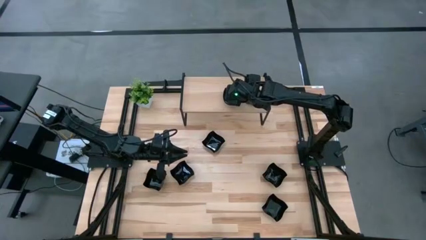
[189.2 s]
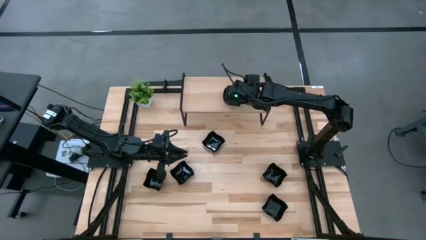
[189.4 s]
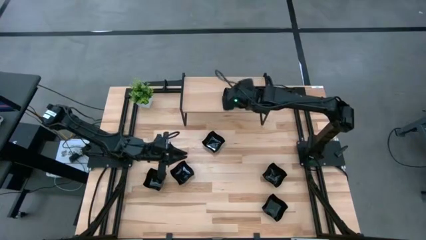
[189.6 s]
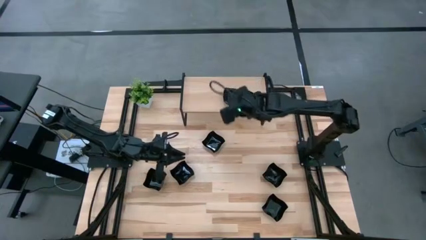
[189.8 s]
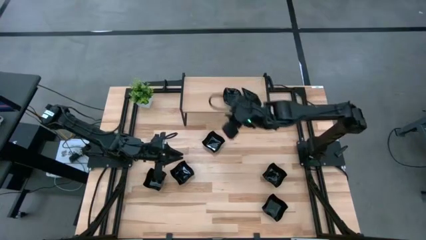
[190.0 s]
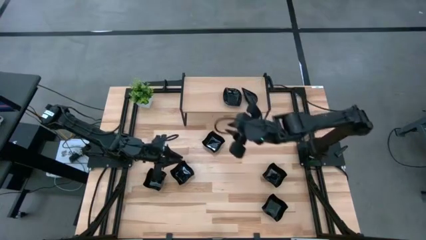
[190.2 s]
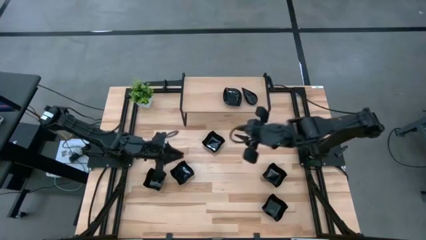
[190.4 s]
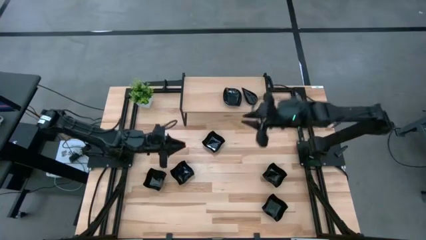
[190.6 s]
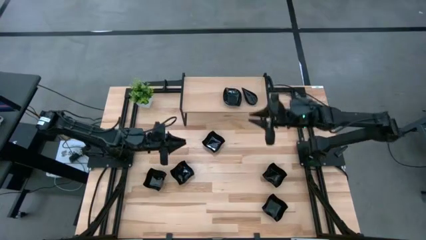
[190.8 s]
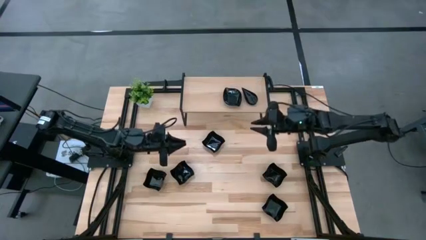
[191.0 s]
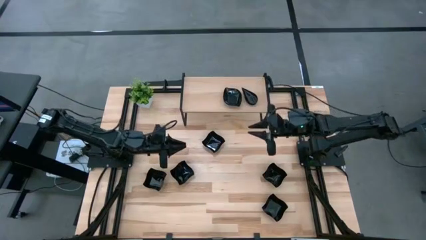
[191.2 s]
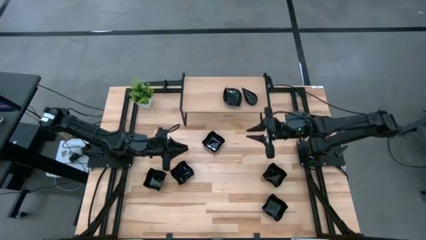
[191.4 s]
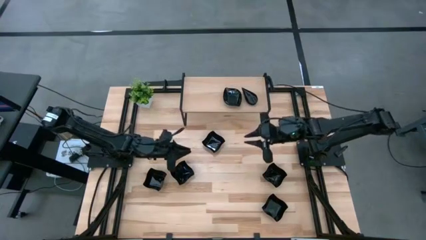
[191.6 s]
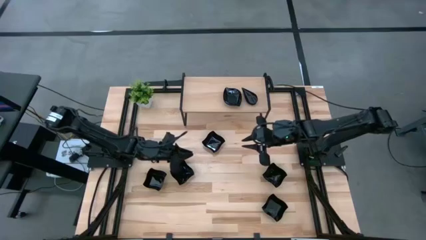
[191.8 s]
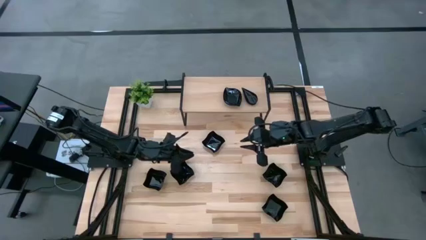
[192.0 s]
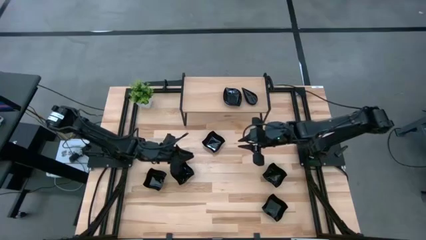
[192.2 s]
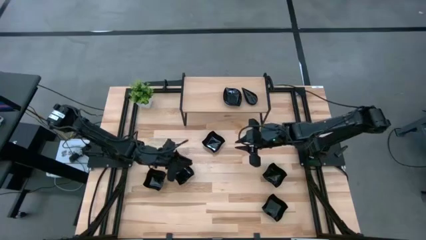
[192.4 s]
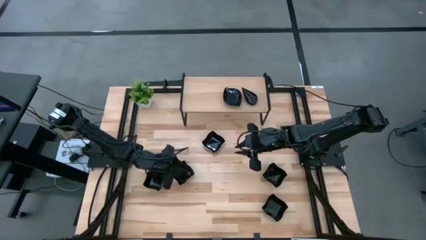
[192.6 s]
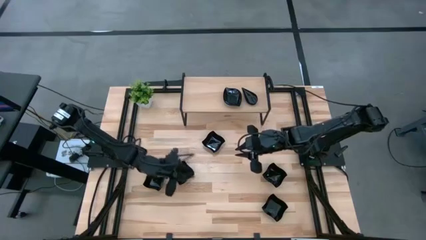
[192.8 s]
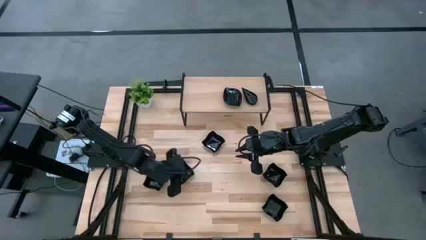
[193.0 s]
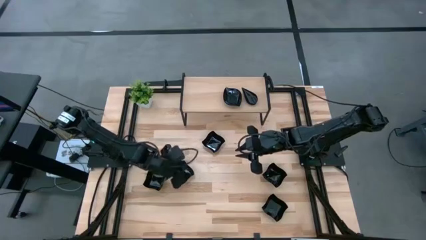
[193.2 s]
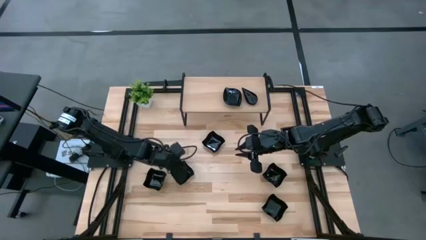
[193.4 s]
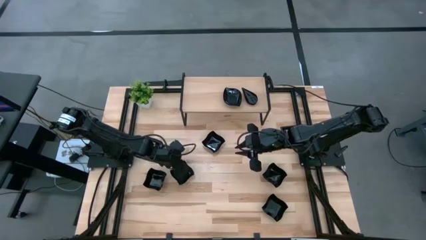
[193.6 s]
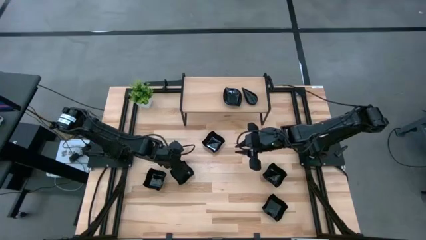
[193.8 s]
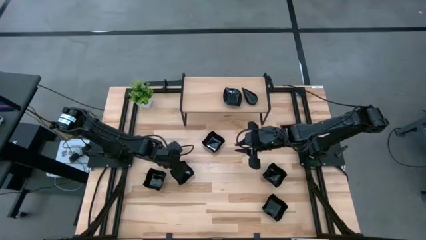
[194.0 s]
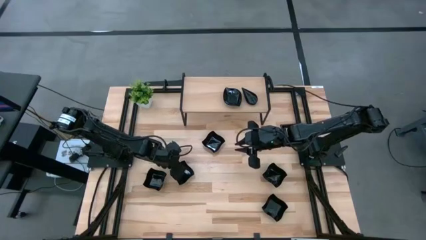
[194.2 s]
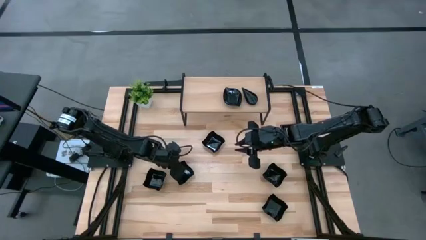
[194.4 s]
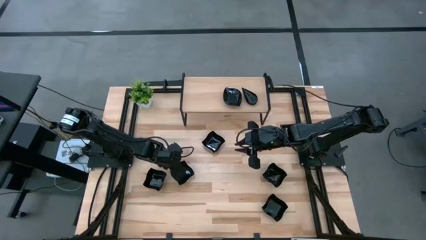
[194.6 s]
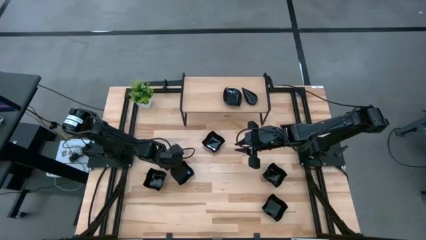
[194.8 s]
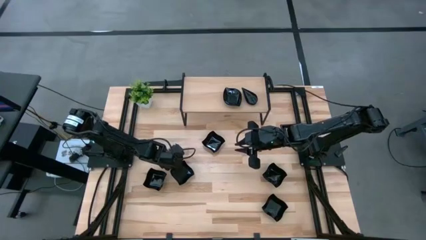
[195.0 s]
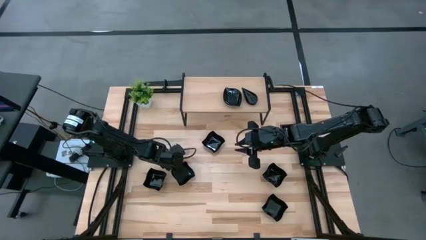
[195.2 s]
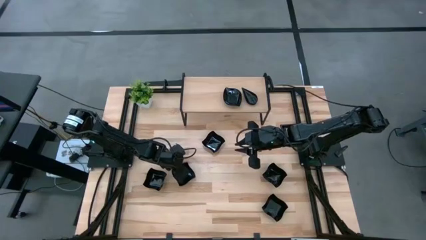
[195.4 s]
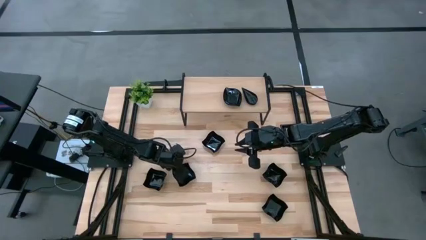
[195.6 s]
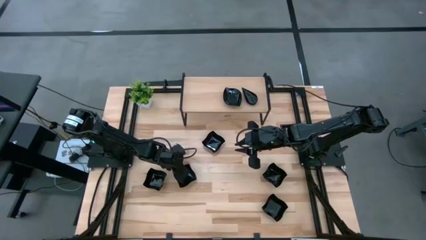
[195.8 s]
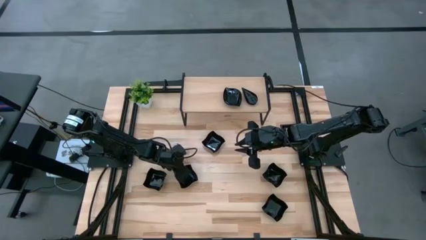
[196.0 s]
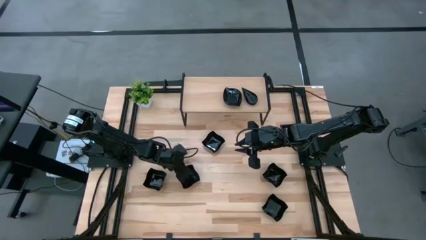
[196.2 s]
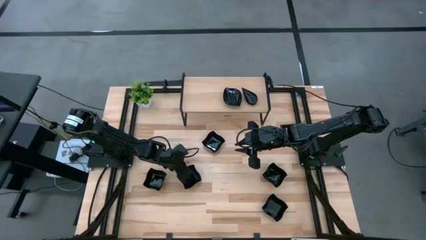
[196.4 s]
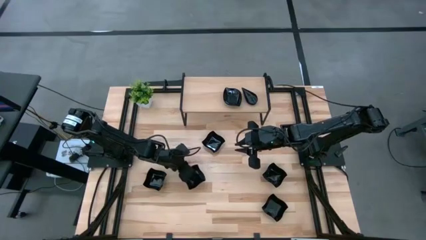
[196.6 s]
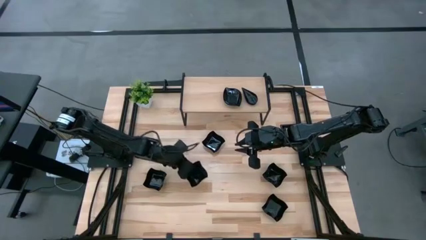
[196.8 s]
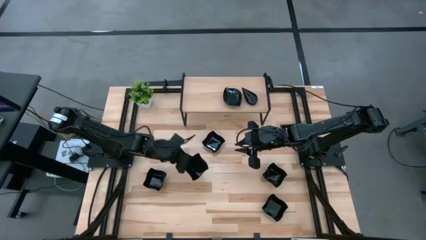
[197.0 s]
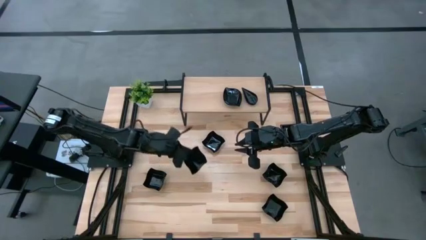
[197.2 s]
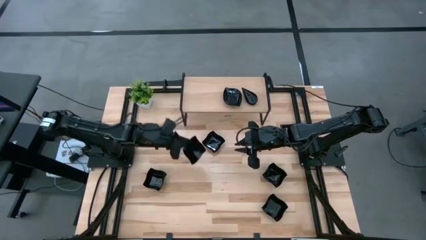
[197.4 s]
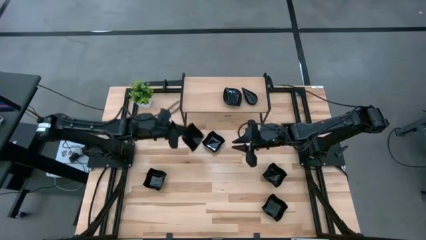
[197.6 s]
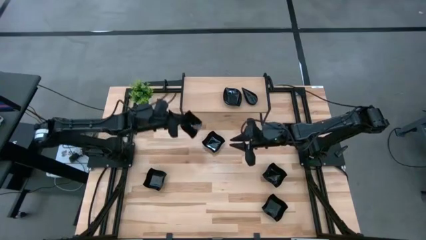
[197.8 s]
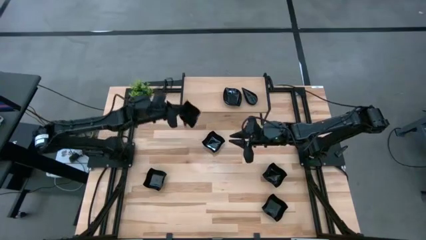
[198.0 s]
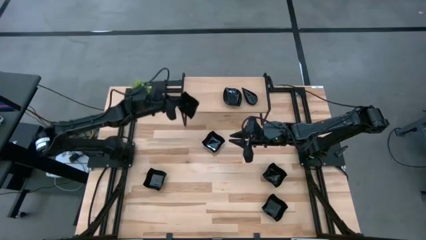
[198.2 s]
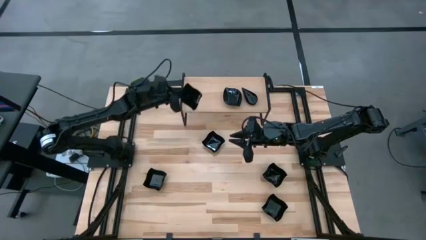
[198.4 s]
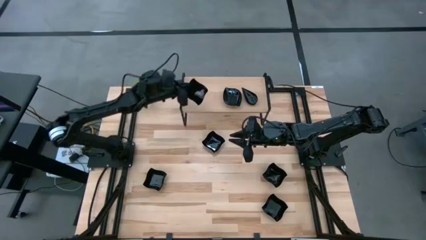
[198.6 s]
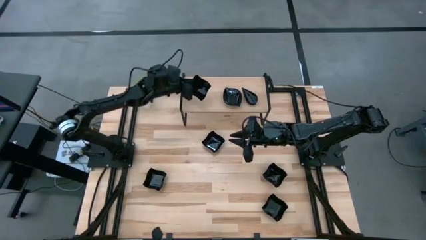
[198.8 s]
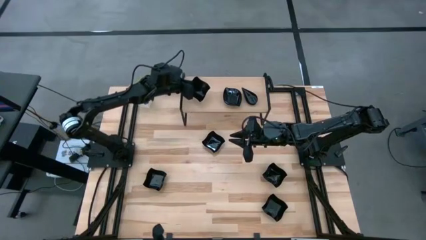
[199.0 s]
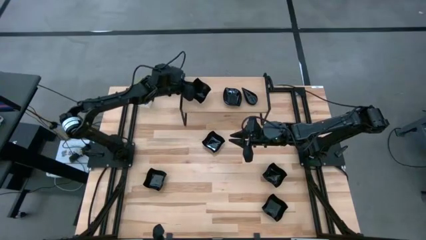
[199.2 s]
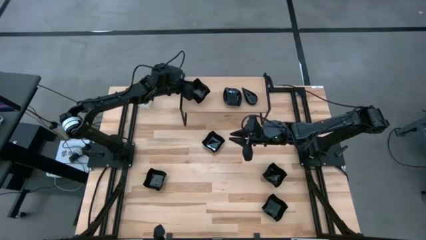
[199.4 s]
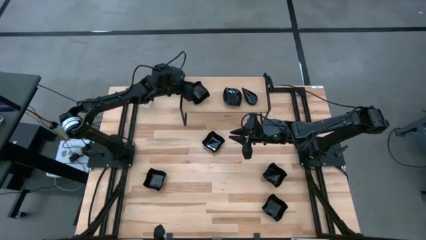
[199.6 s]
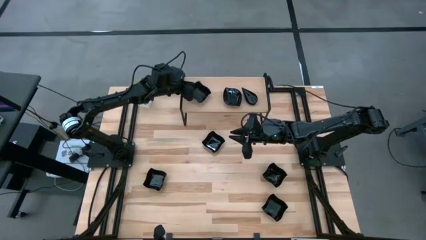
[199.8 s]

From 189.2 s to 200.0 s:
Task: Pick & Place Mini shaped plates
Put the black wave square shaped plate on the shelf
